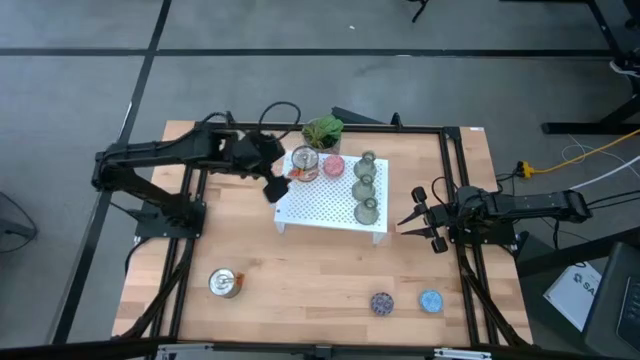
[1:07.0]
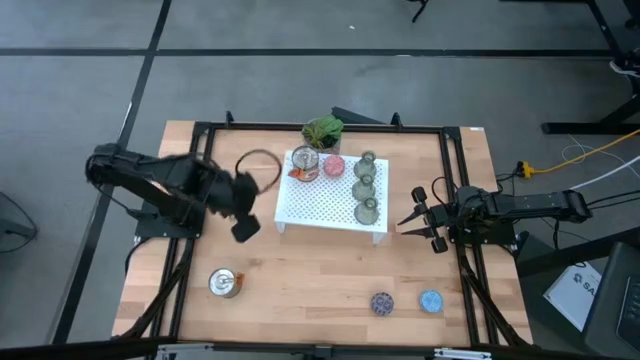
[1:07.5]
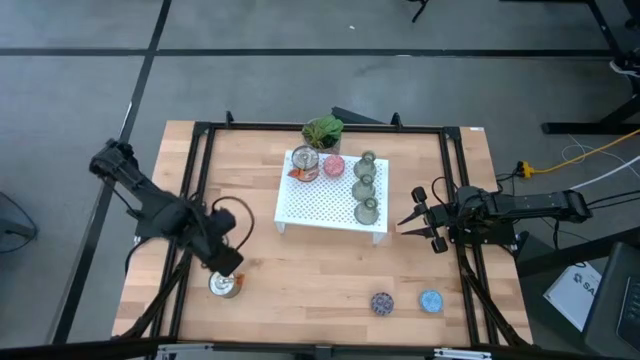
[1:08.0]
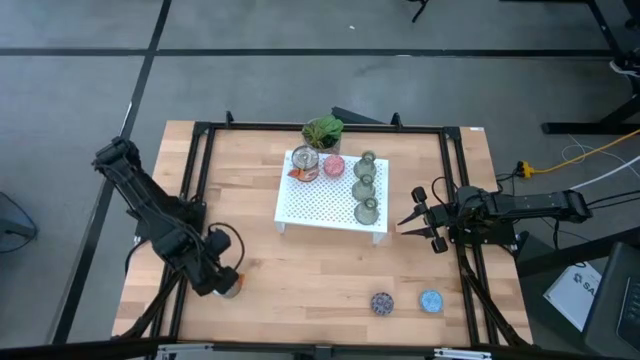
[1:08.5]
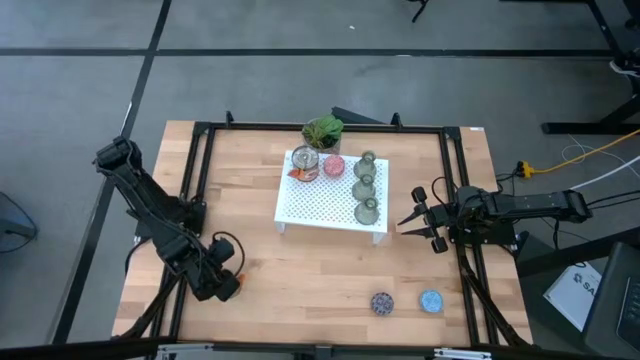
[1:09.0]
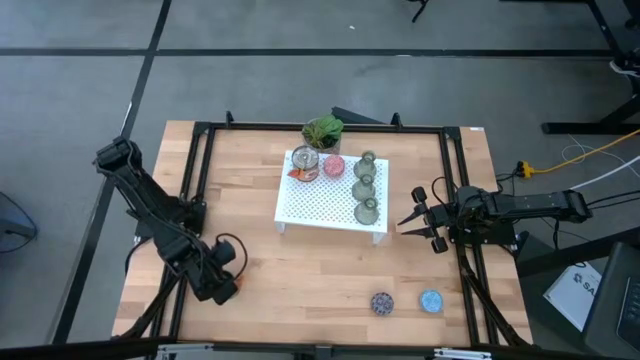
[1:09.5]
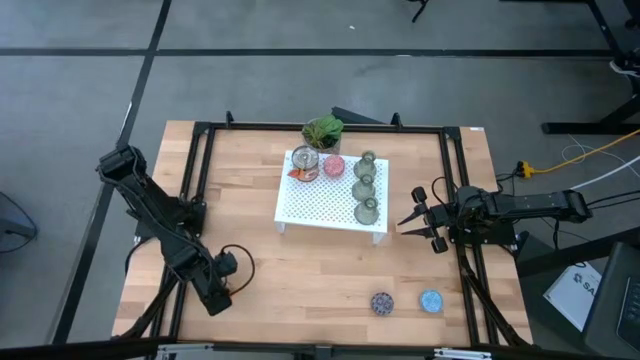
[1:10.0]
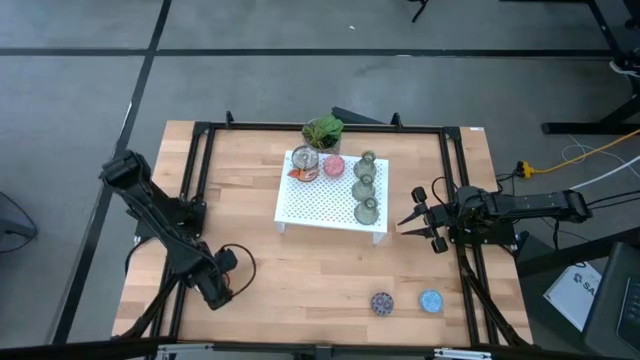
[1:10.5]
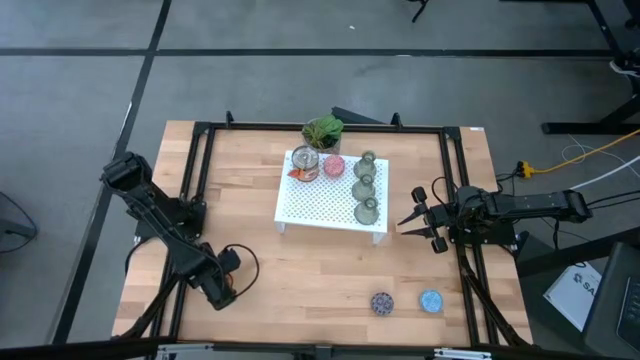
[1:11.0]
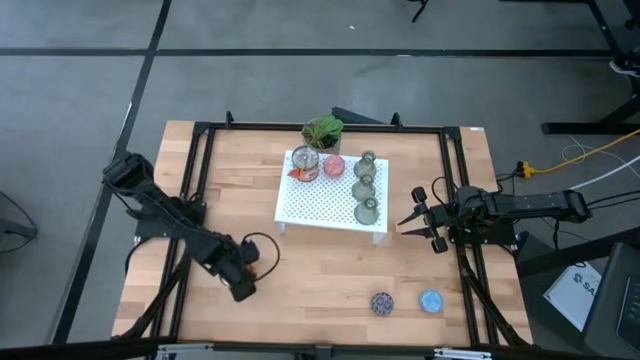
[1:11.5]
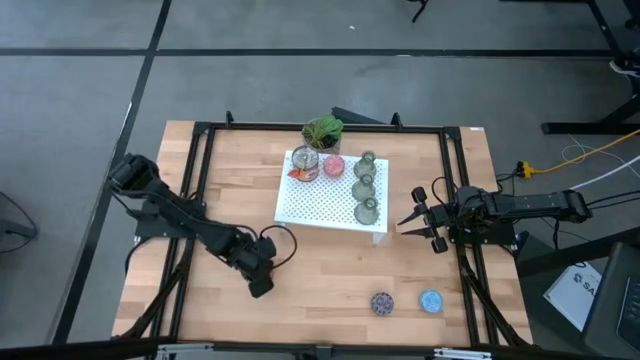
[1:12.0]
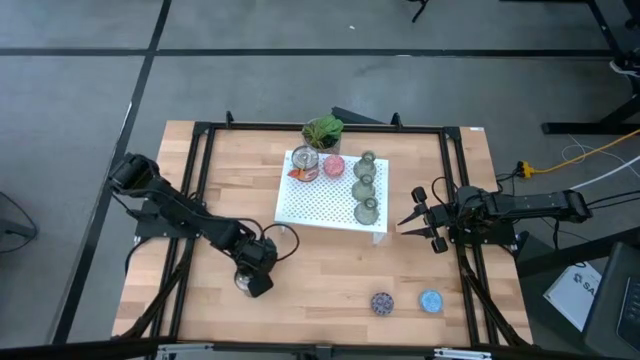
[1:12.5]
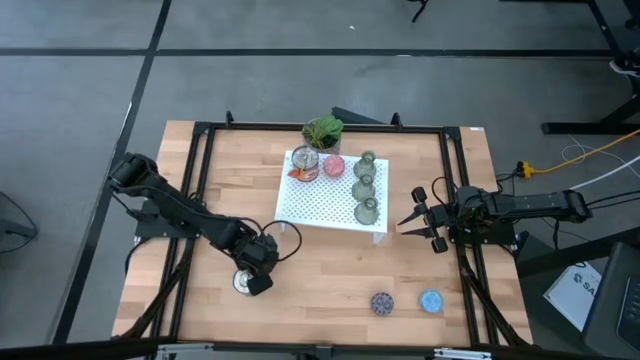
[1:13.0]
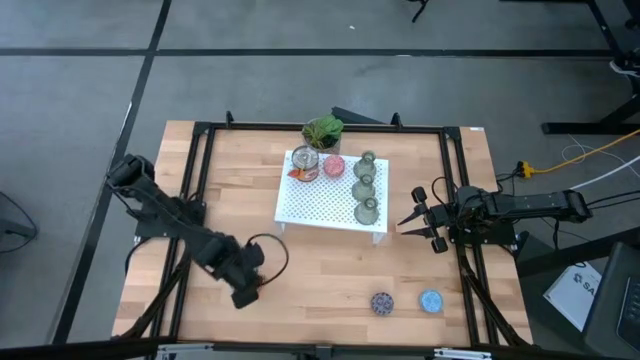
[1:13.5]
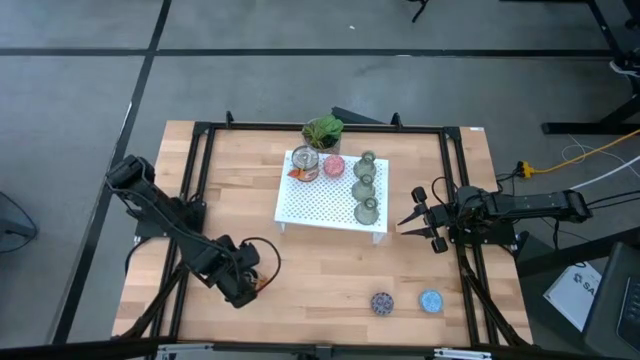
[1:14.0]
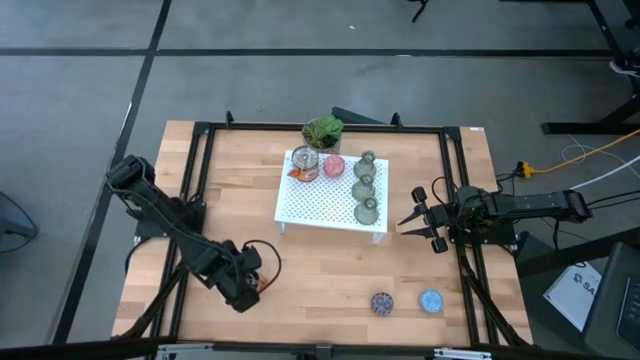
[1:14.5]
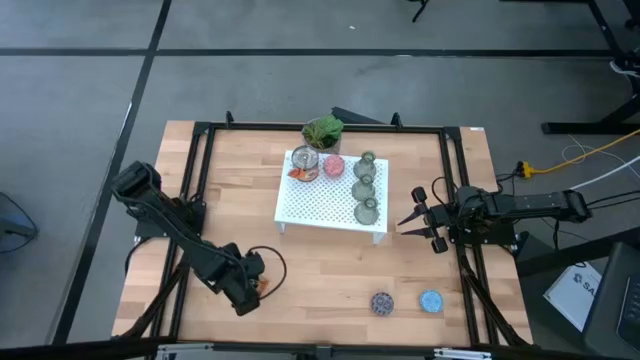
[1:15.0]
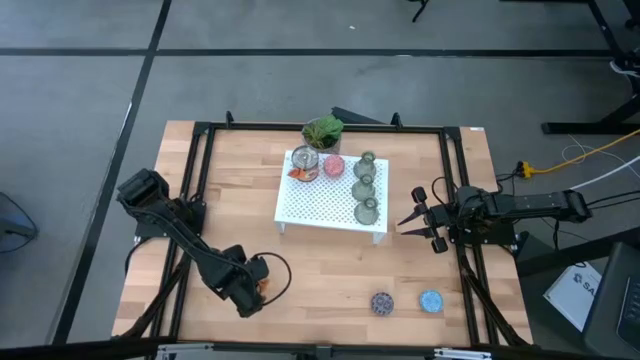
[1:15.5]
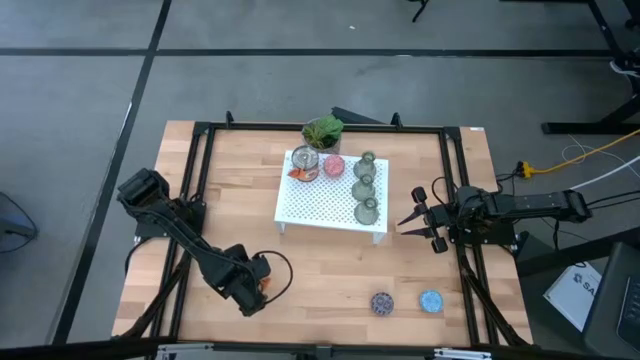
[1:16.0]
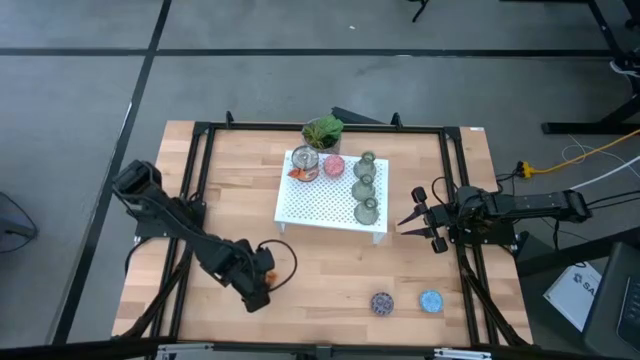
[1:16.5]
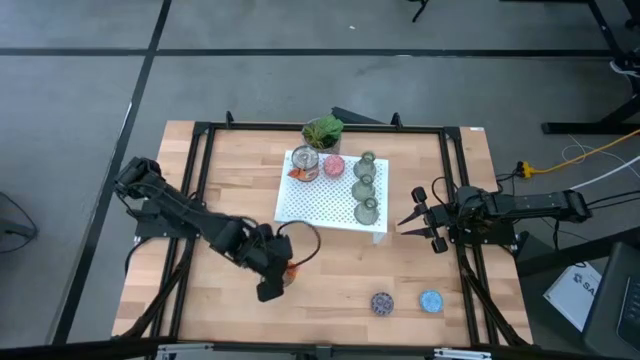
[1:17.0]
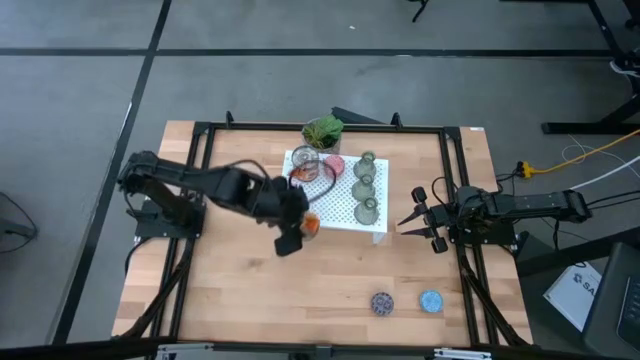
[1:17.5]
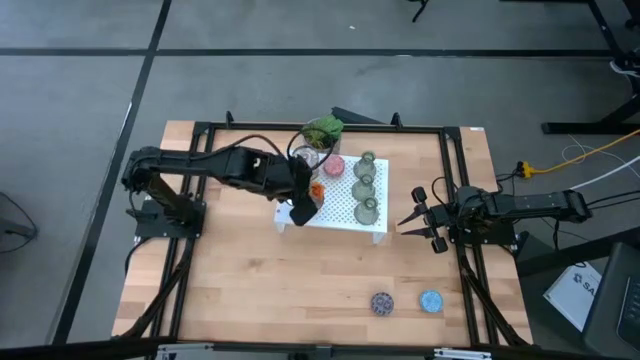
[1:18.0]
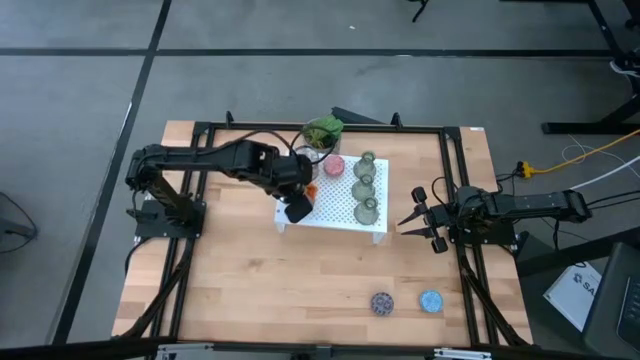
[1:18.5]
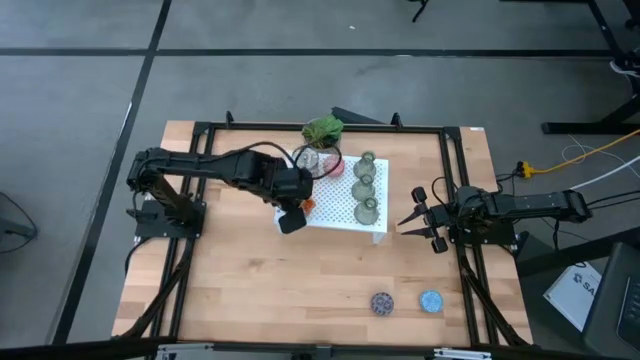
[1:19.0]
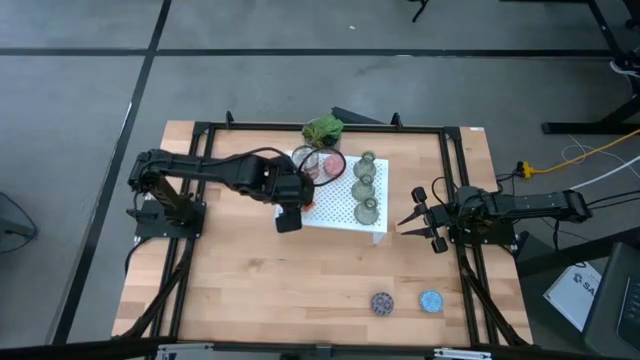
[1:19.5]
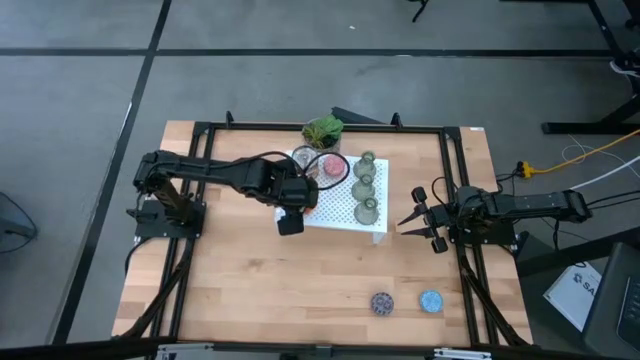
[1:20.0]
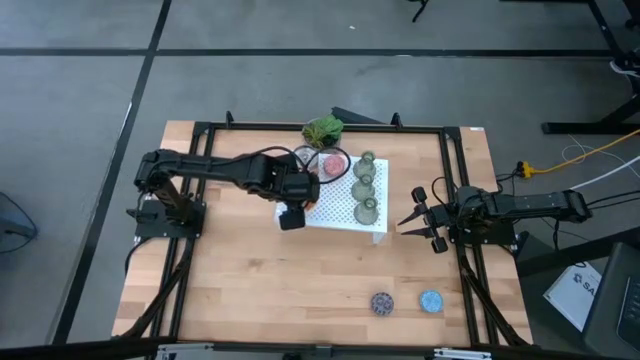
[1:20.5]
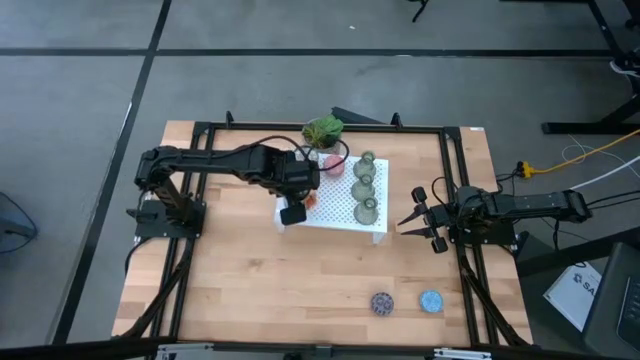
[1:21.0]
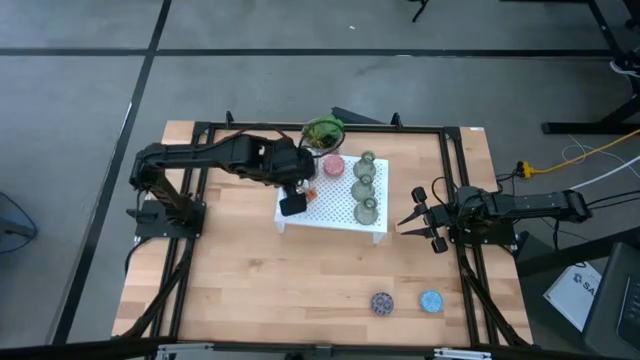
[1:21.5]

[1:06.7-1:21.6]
Task: Stock candles and vases on shelf
Put the scented candle on the shelf

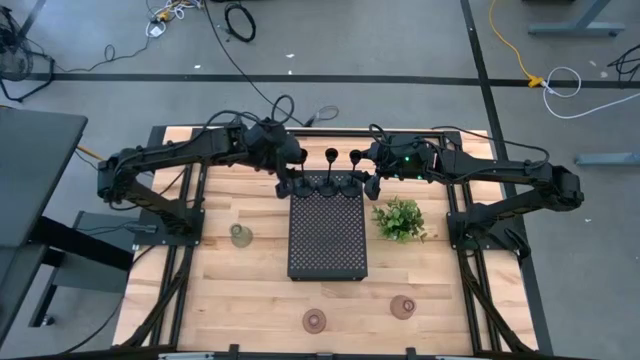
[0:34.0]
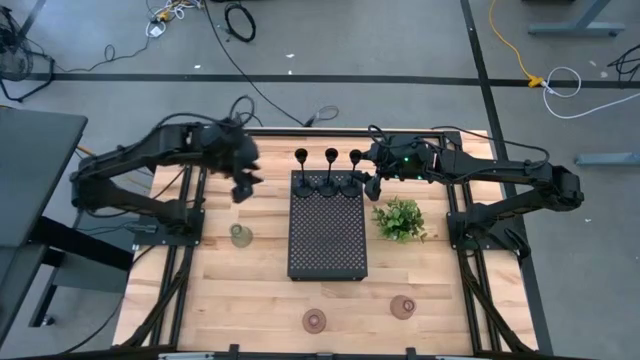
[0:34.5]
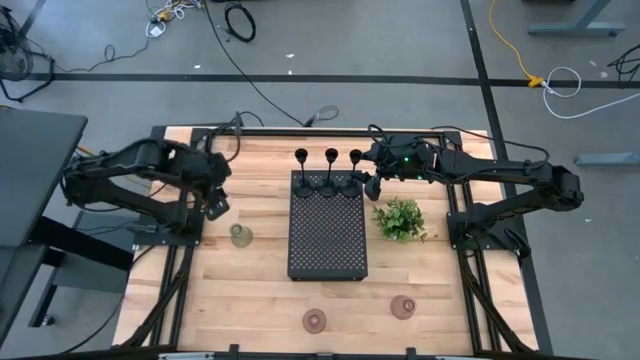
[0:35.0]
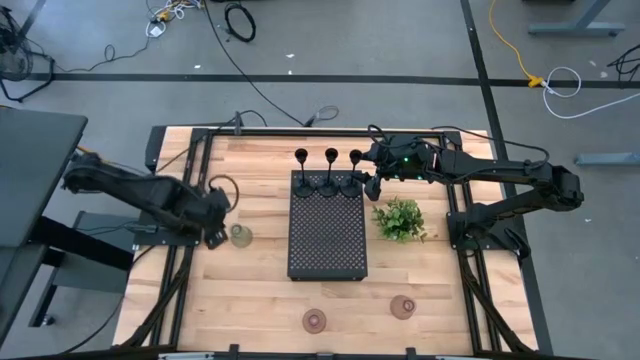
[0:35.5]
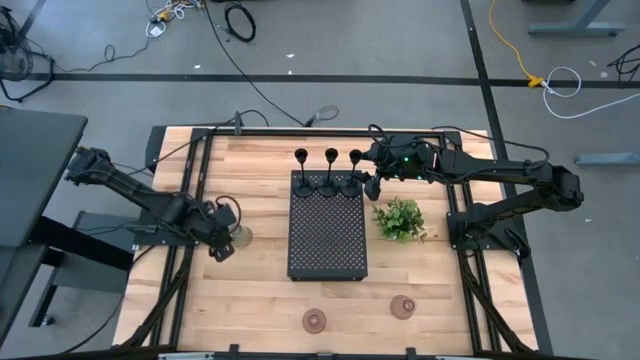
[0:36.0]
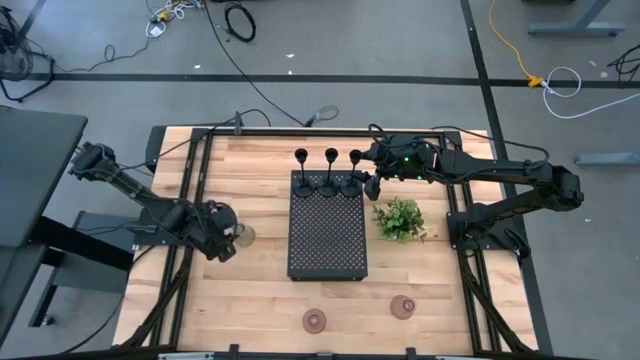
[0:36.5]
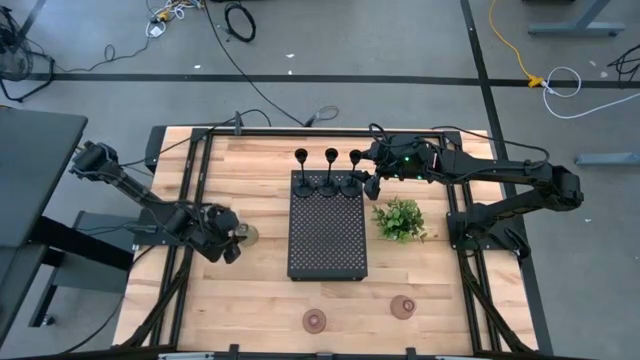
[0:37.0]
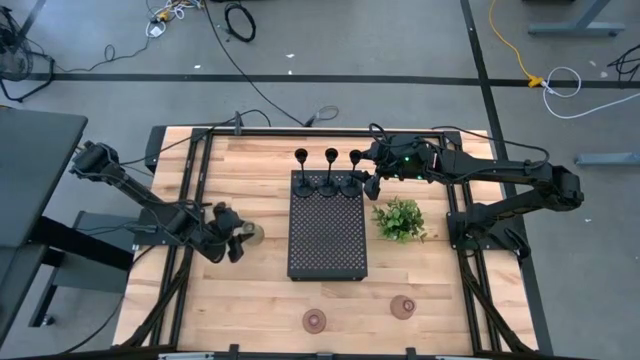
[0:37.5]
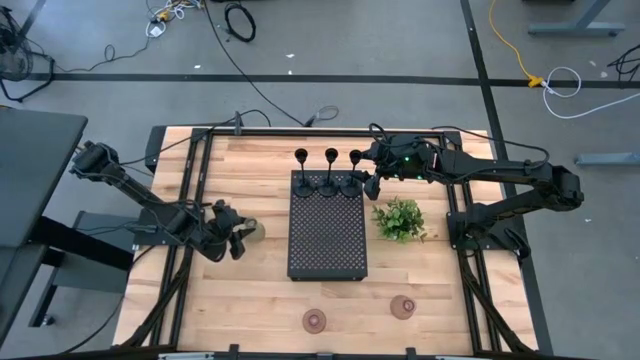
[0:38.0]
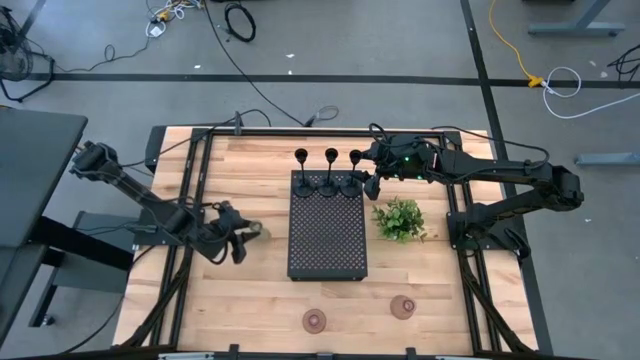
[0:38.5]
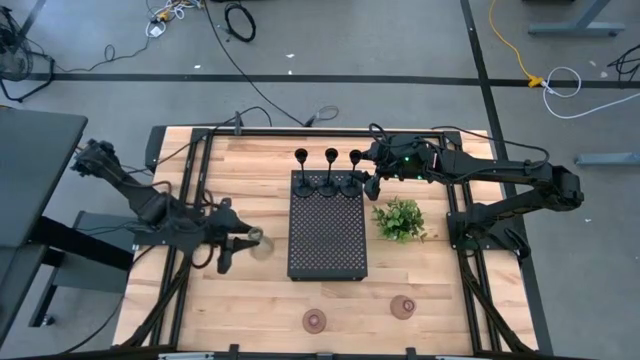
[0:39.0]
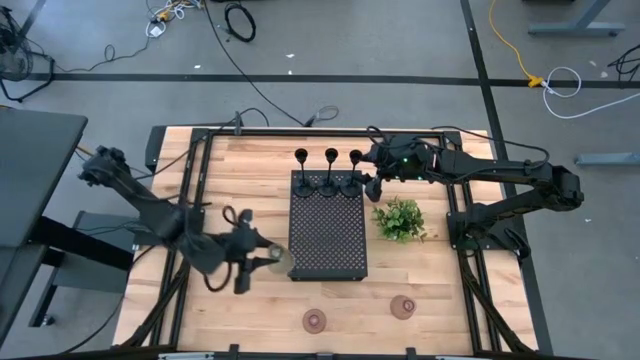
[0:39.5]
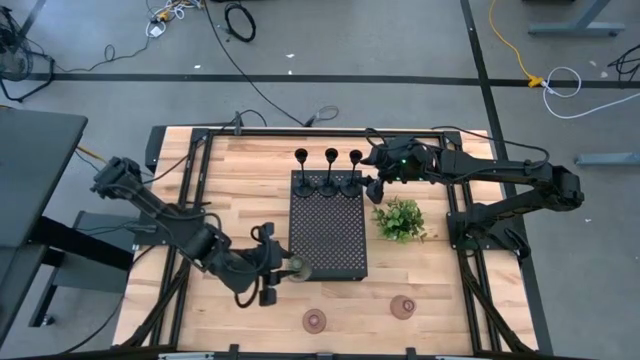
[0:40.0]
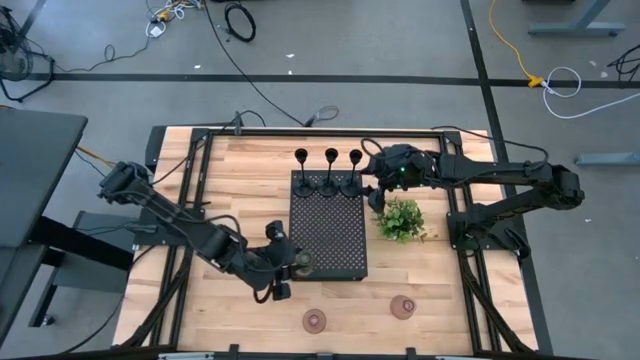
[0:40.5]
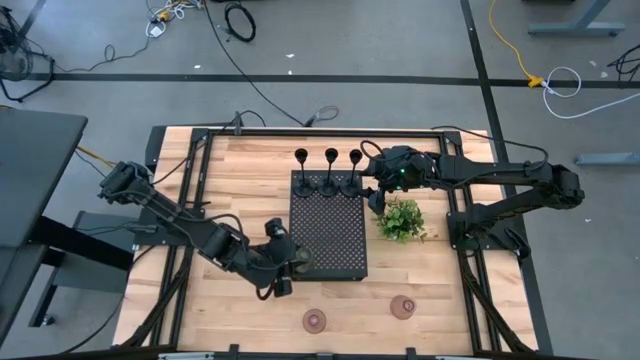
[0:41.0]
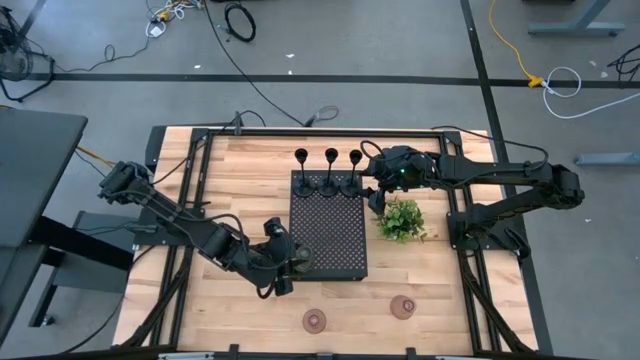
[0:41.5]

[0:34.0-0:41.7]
Task: Pick & Place candle stick holders
Put the green glass candle holder on the shelf
